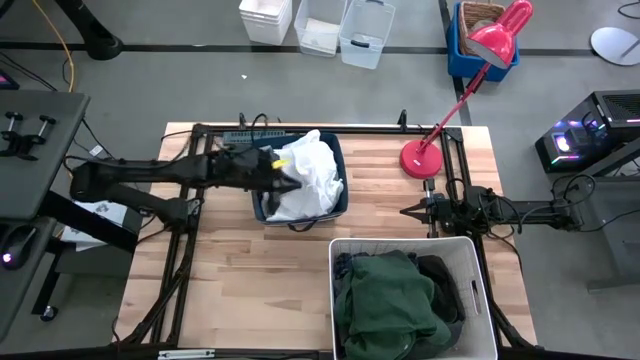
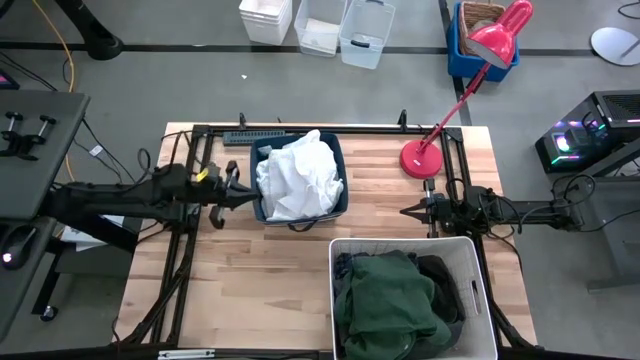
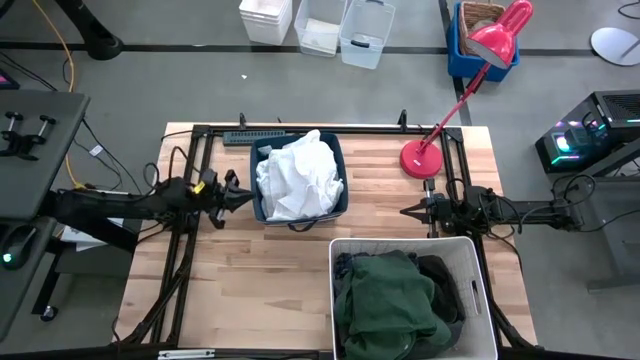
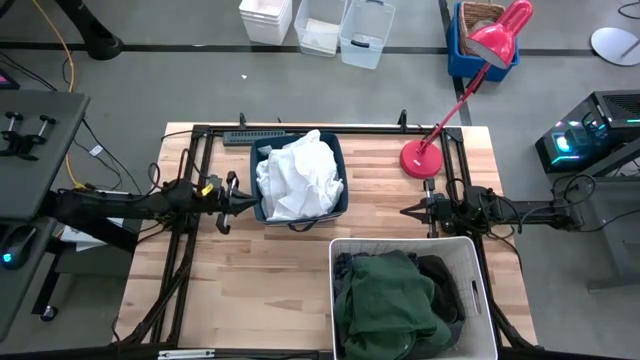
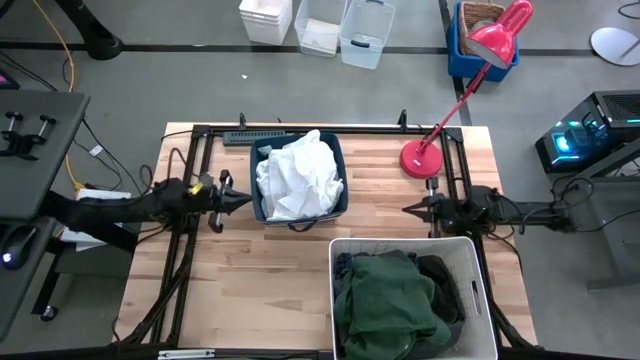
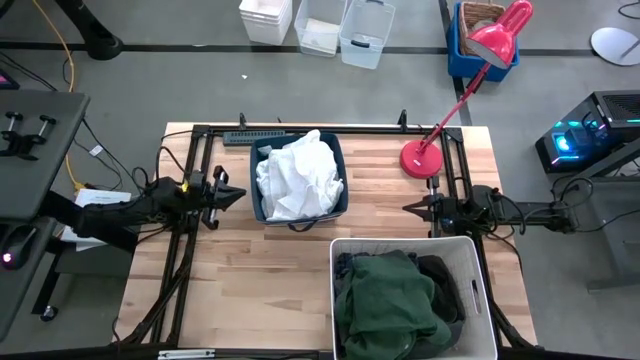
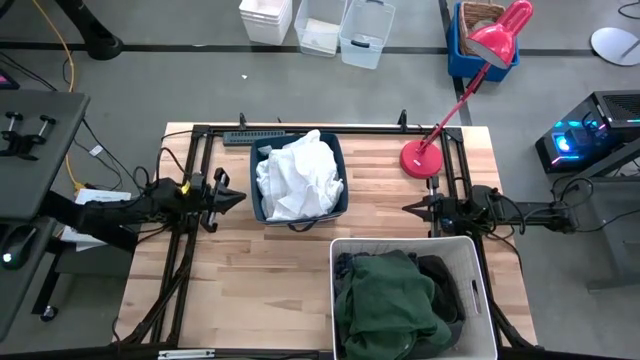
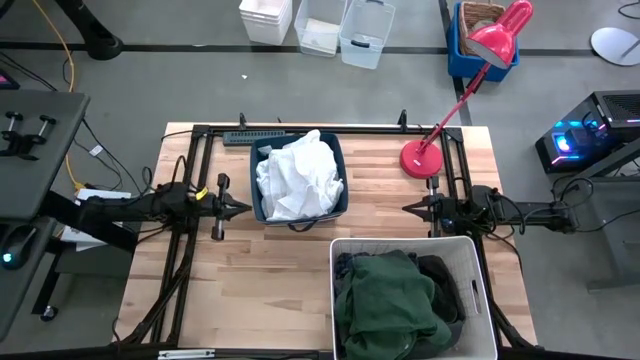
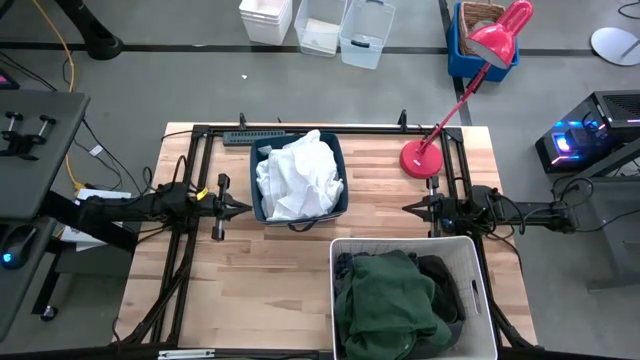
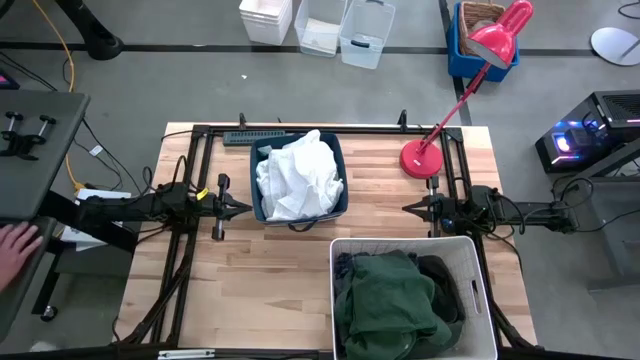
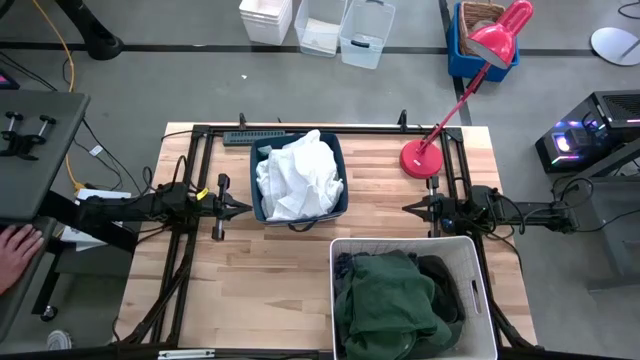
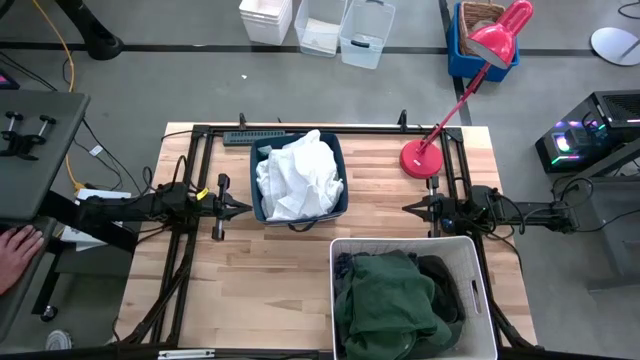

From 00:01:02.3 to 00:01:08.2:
Task: Sort clothes
Return to Home Position

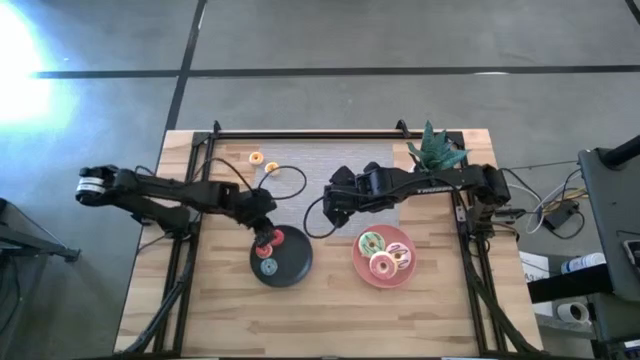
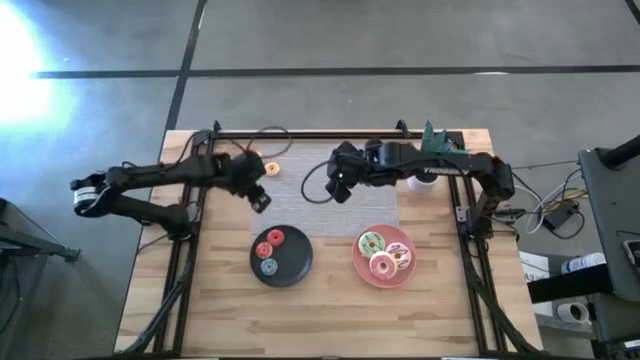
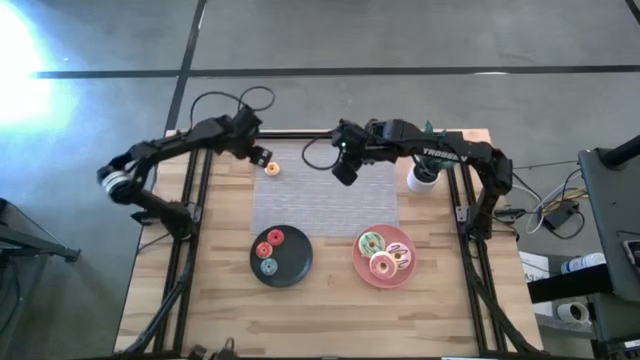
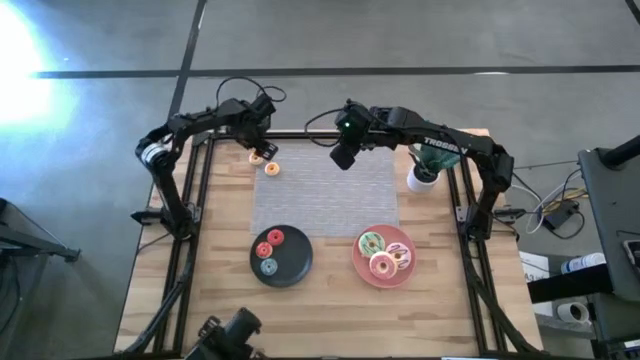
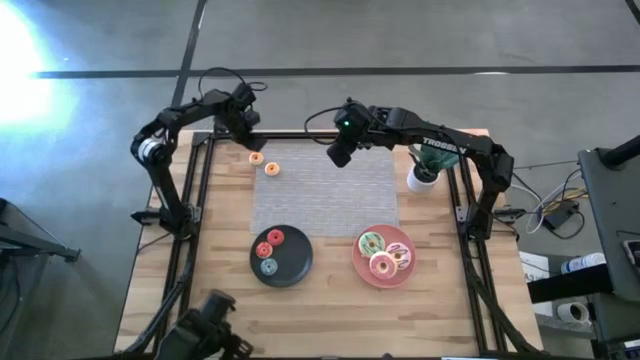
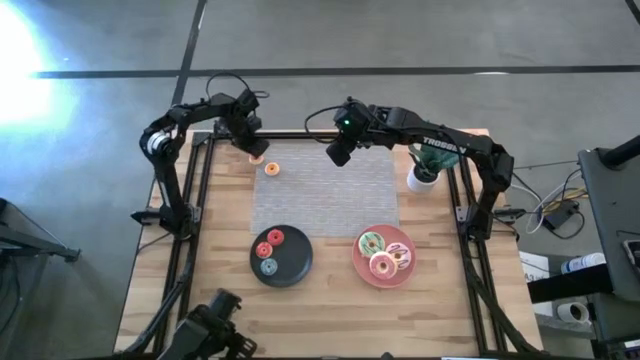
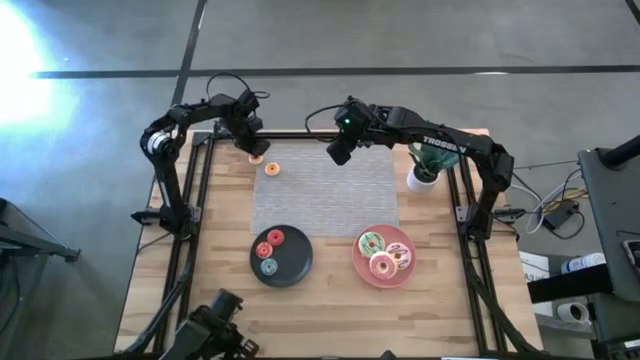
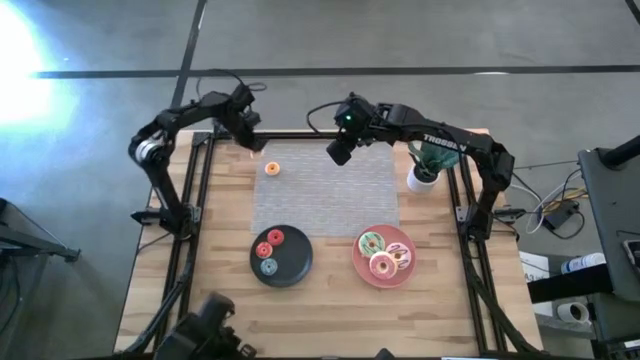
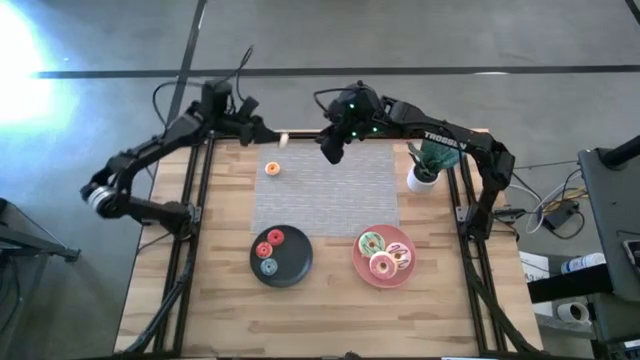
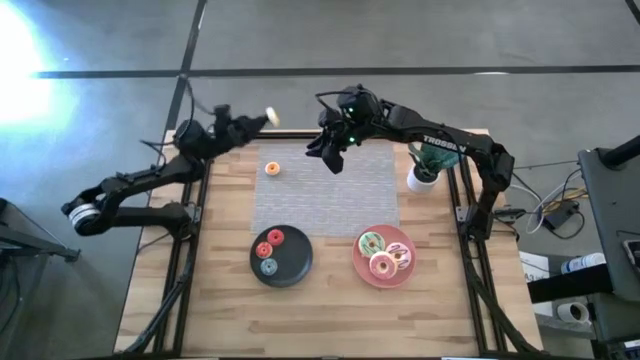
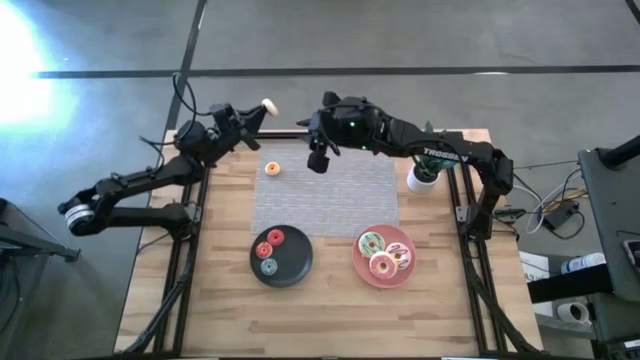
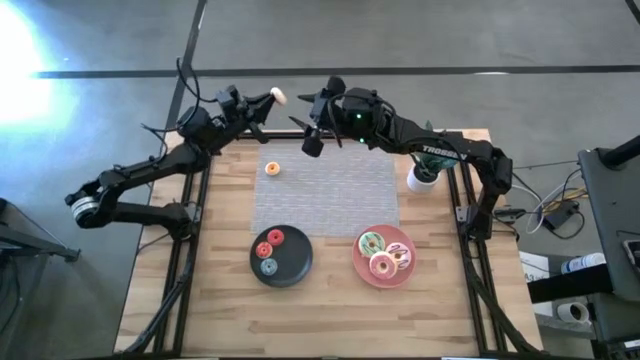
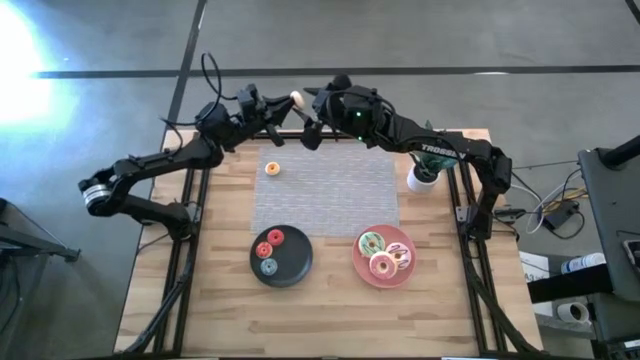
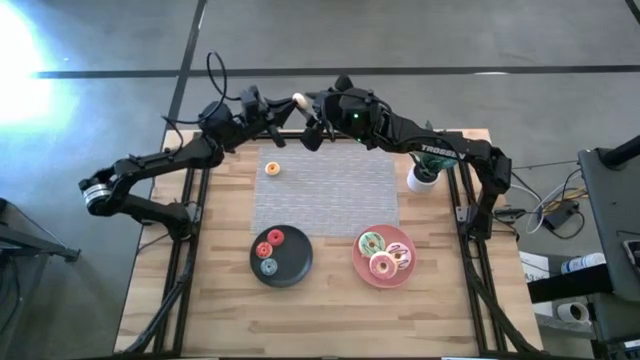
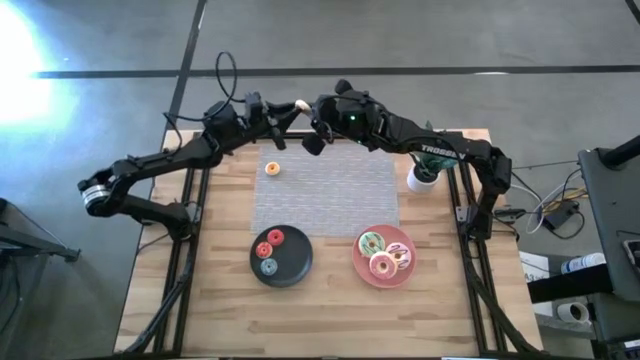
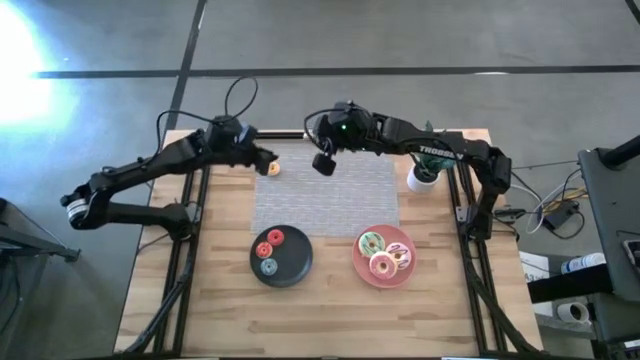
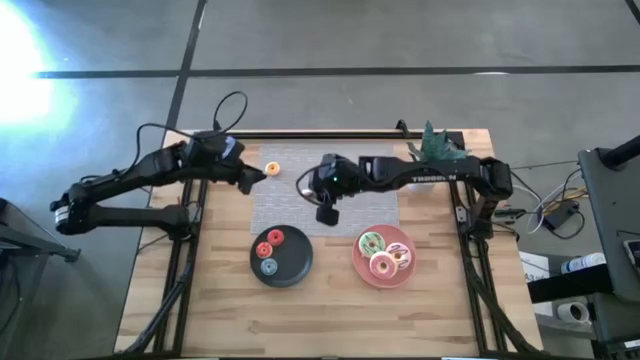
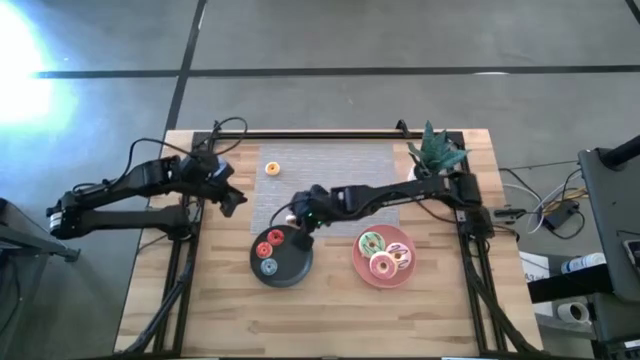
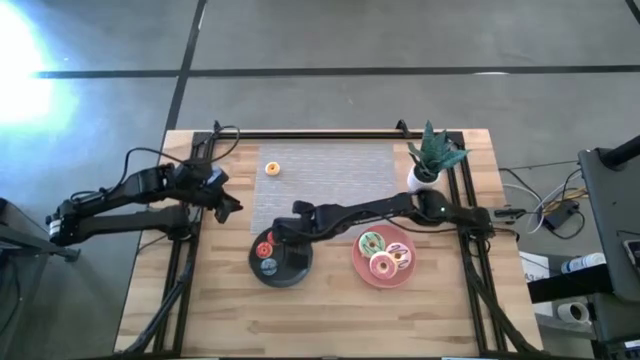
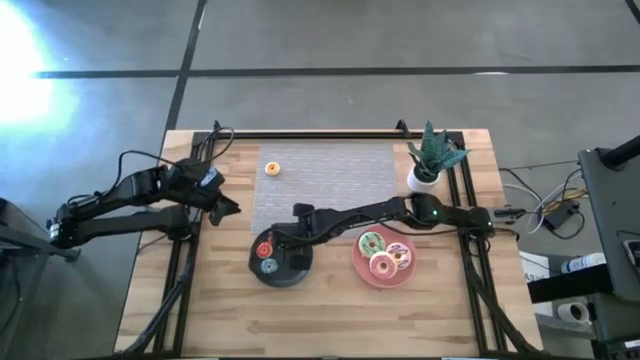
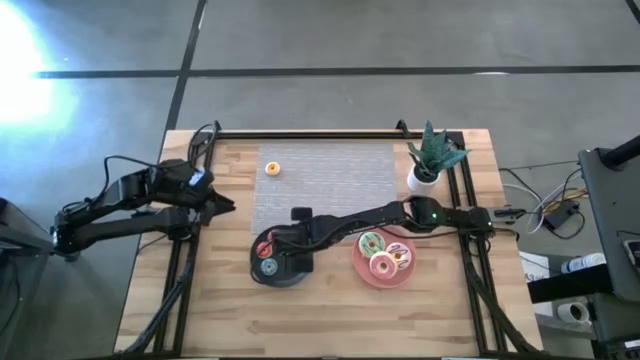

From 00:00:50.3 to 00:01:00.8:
Task: Pick & Place donuts
Put the small yellow donut on the black plate

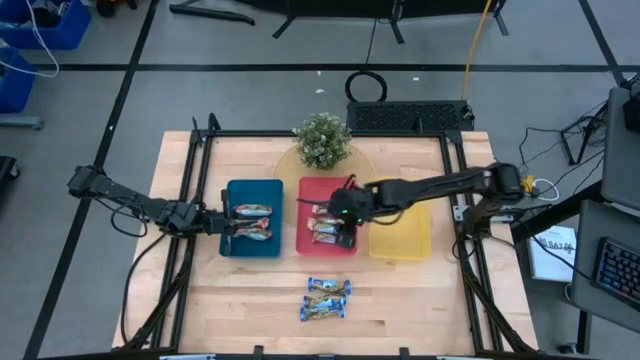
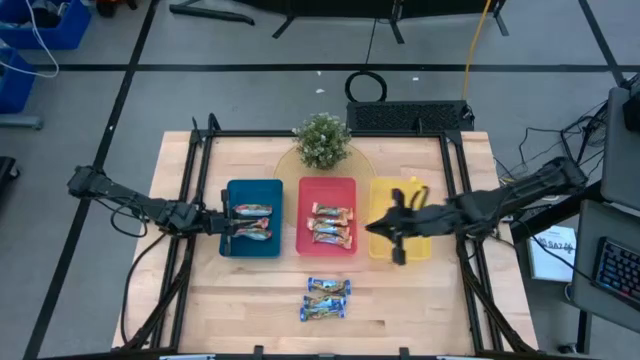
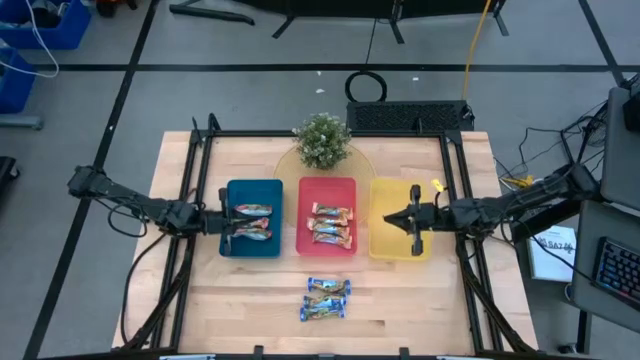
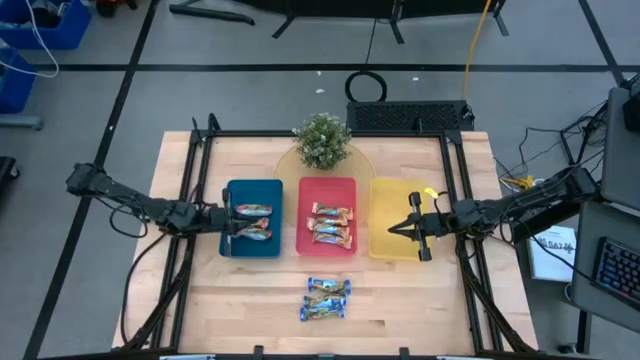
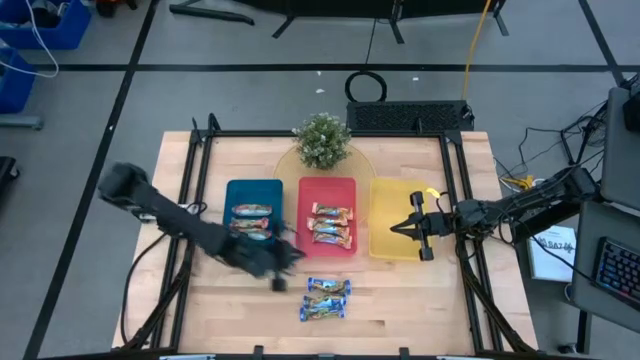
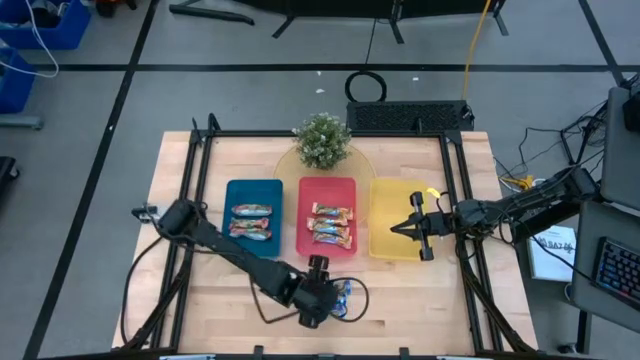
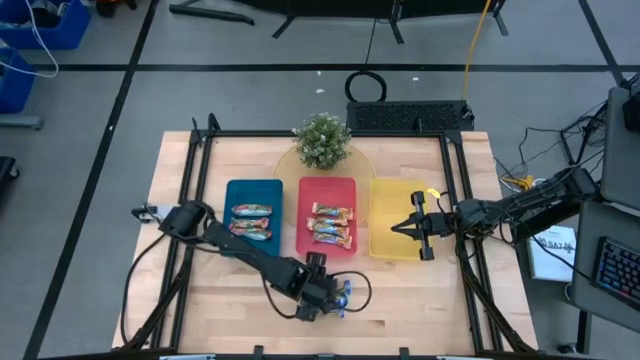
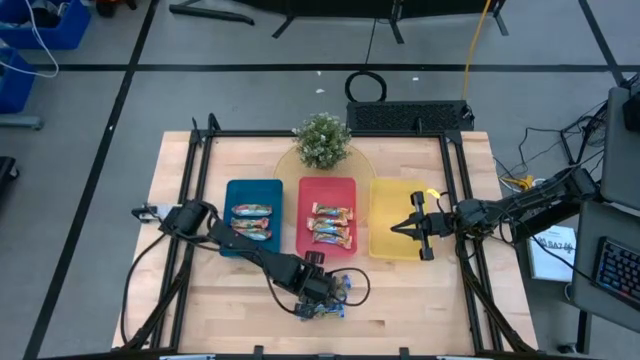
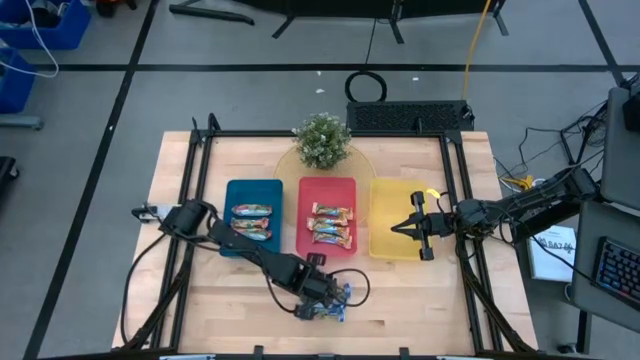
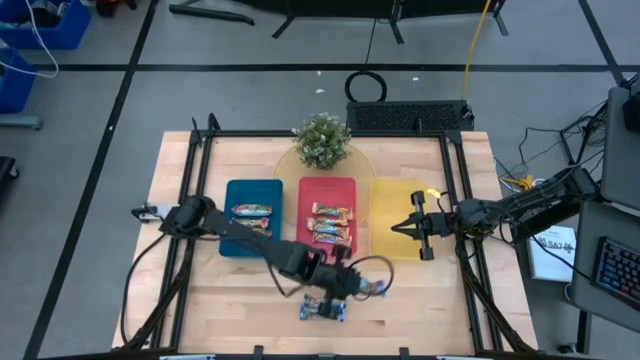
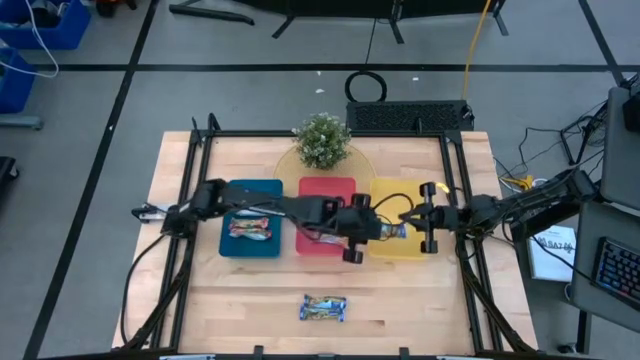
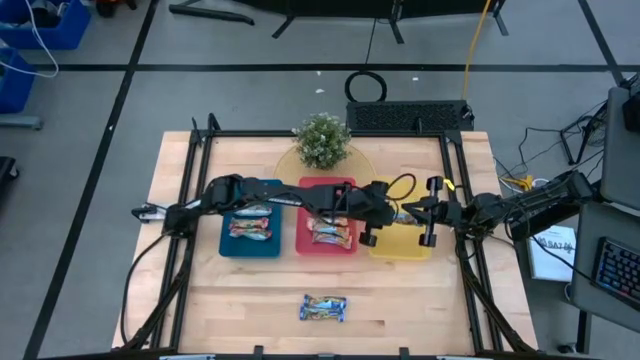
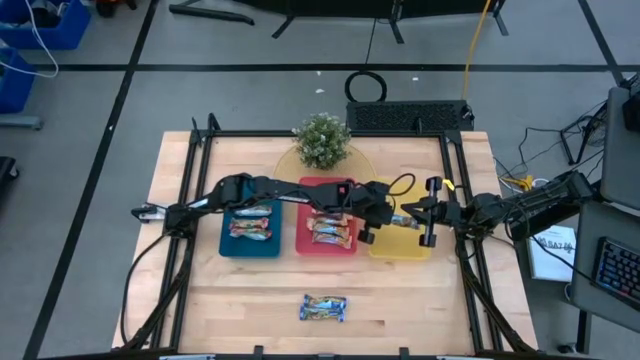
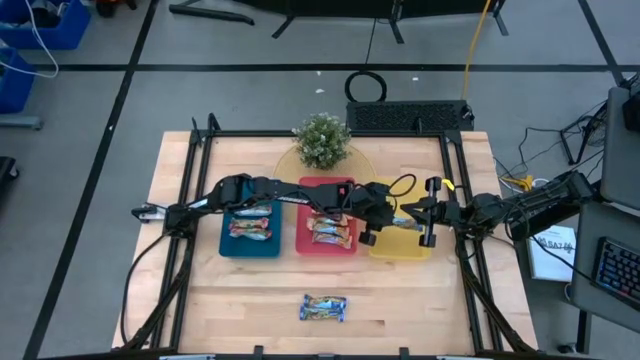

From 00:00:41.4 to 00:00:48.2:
Task: Pick and place Granola Bars by type
Put the top blue granola bar into the yellow bin
